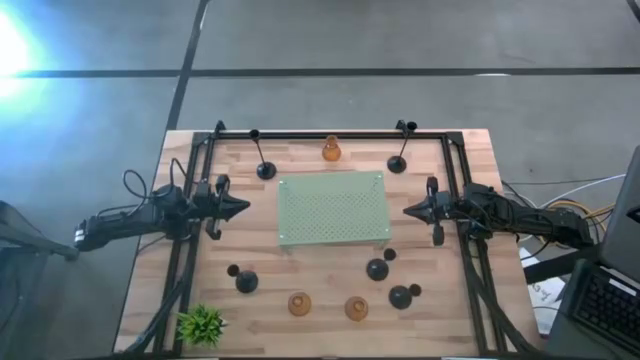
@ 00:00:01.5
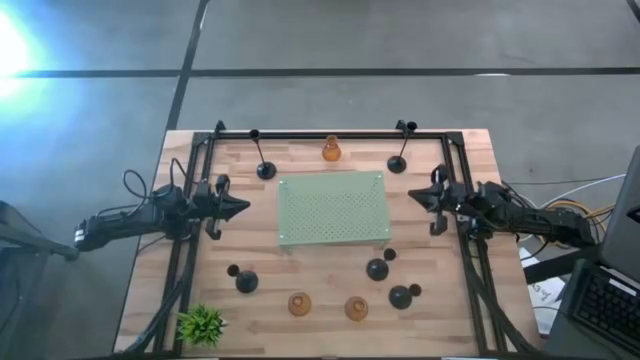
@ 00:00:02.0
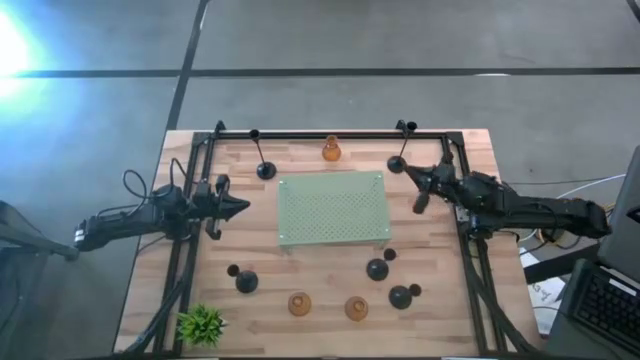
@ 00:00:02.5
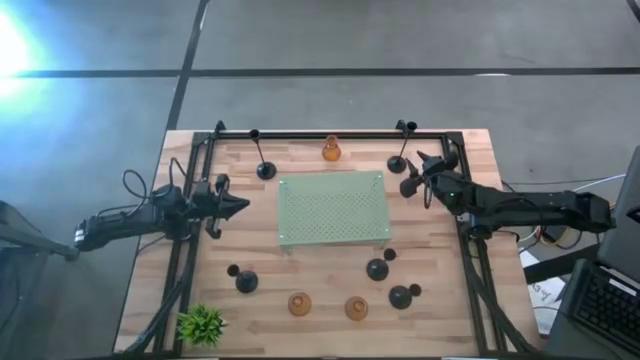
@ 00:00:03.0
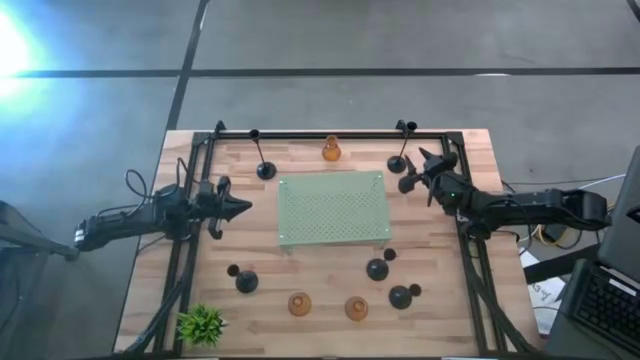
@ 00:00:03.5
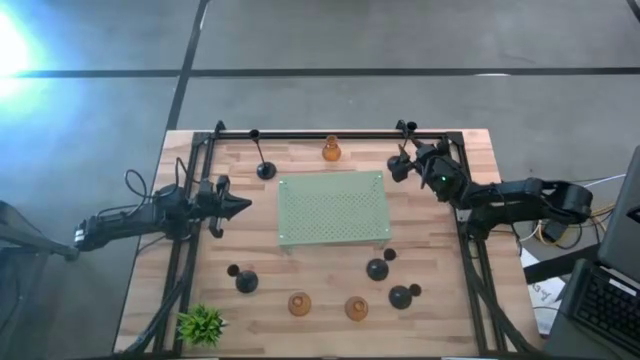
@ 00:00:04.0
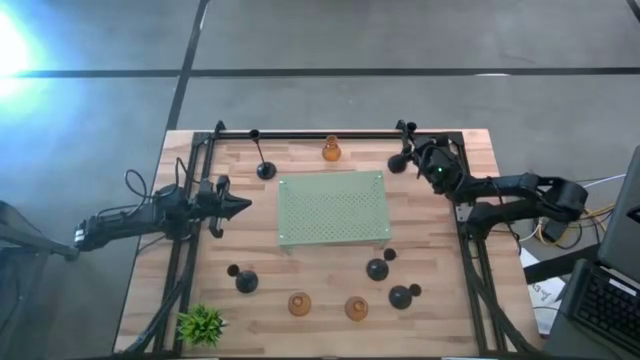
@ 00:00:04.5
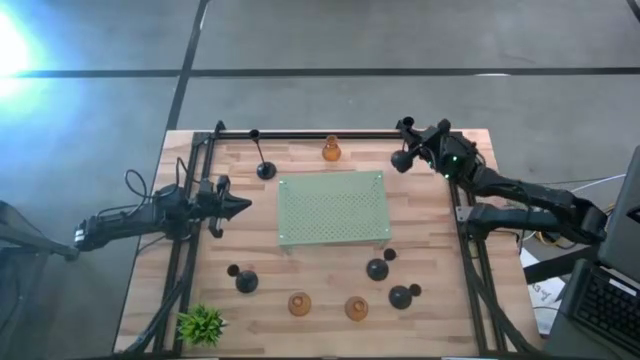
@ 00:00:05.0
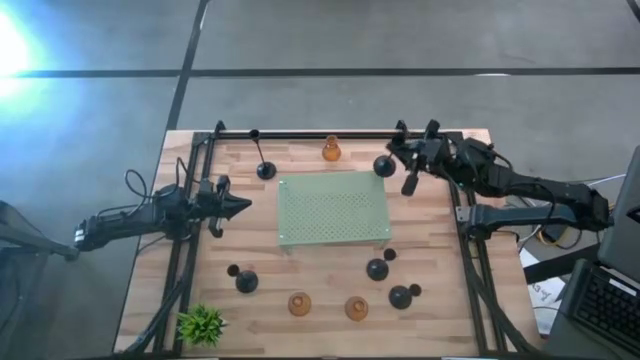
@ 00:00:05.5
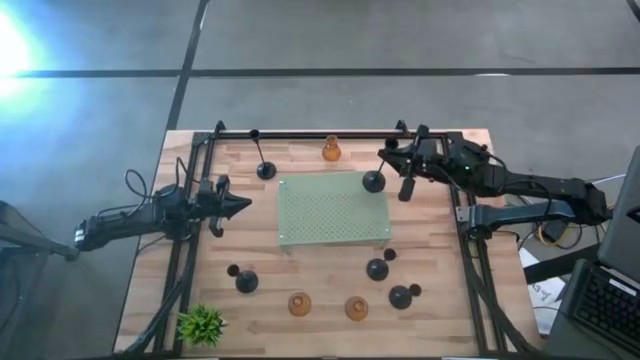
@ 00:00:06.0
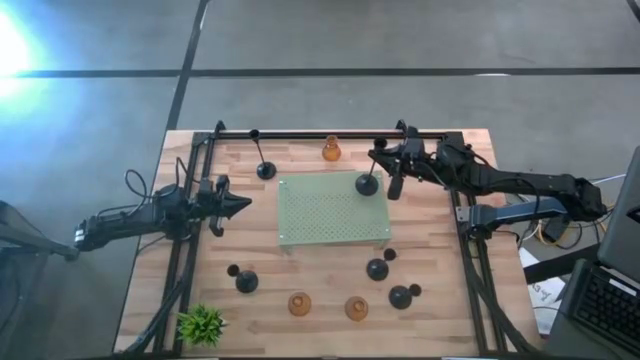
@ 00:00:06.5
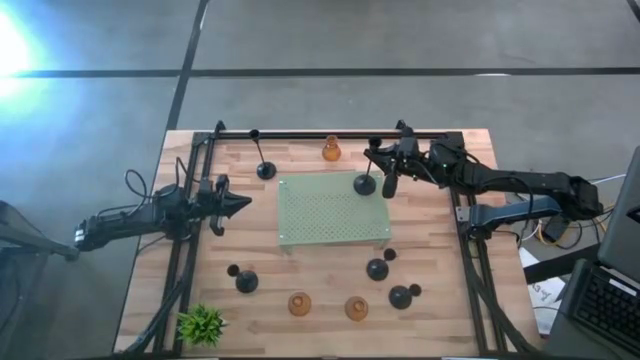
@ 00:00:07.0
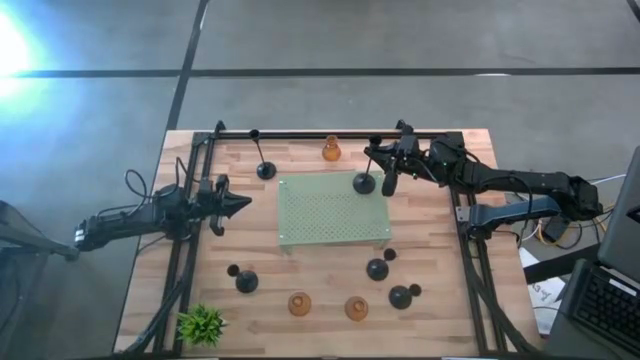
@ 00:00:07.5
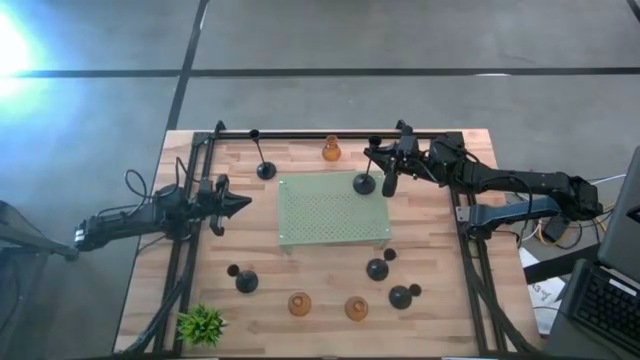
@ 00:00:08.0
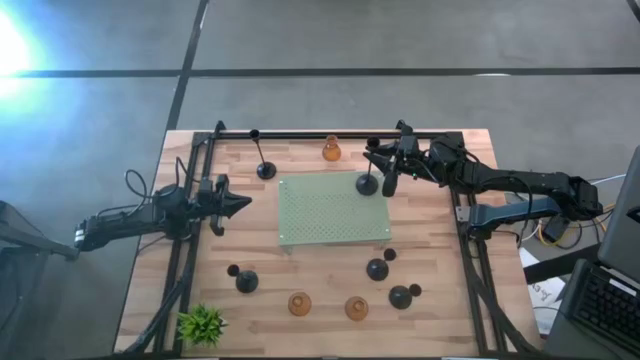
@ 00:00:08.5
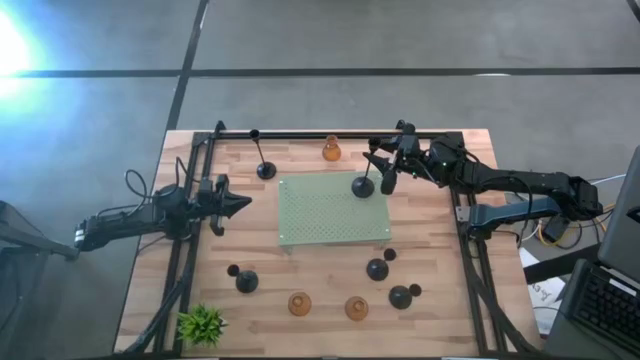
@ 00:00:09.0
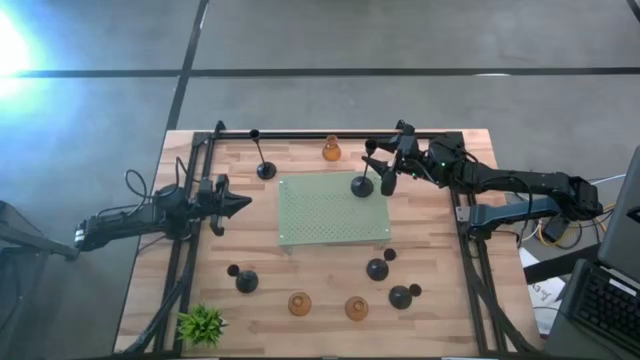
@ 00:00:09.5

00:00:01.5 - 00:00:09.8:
Task: Pick & Place candle stick holders
Put the top right large black candle holder on the shelf

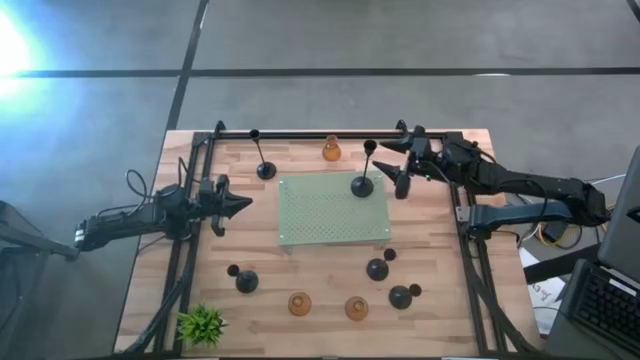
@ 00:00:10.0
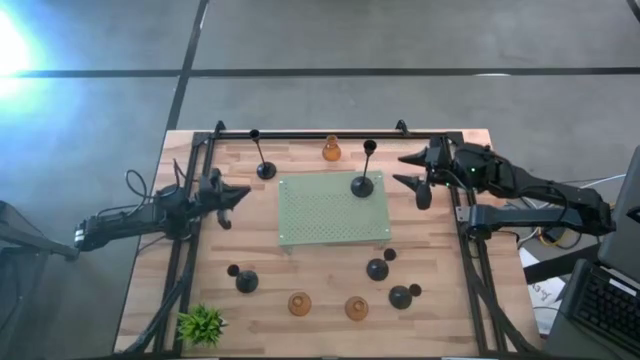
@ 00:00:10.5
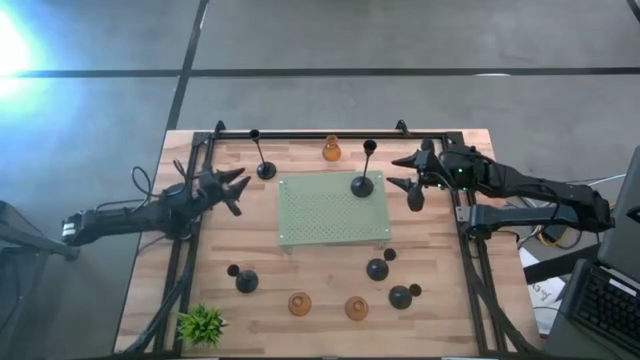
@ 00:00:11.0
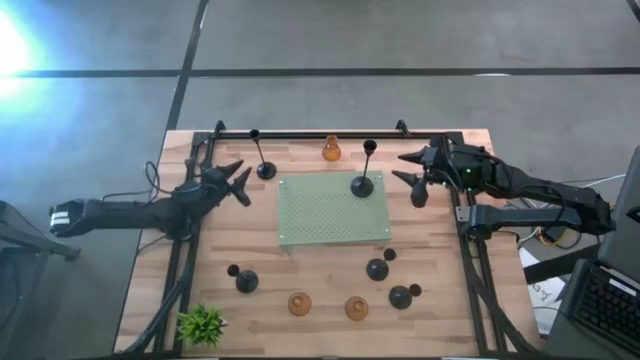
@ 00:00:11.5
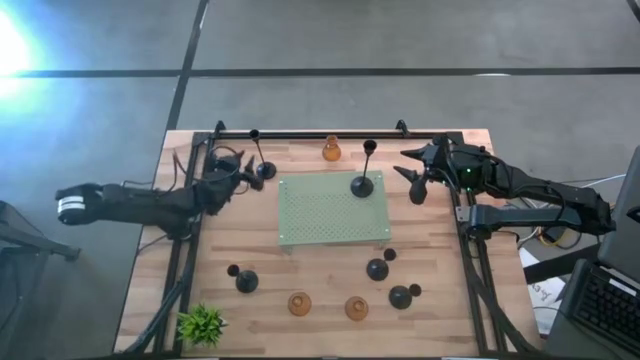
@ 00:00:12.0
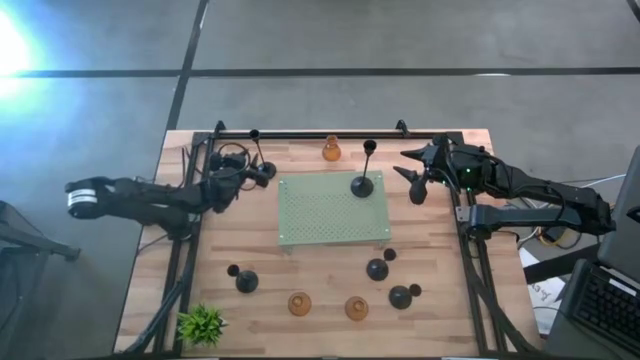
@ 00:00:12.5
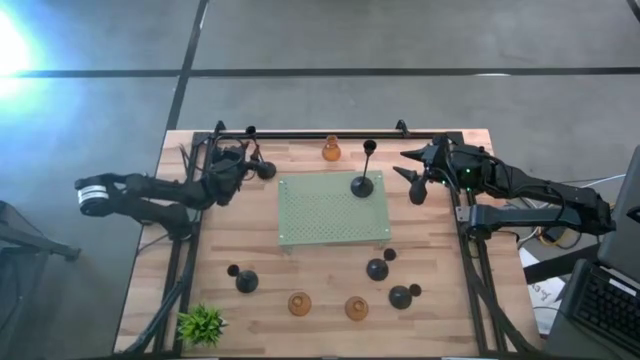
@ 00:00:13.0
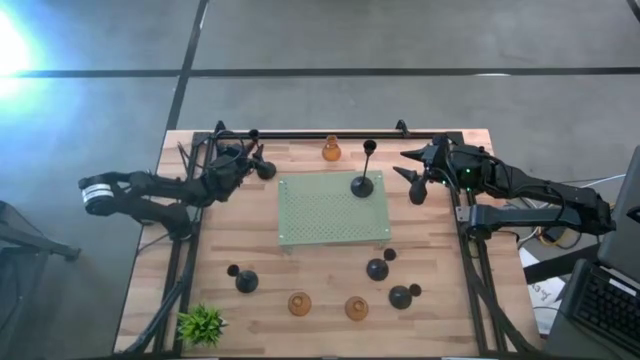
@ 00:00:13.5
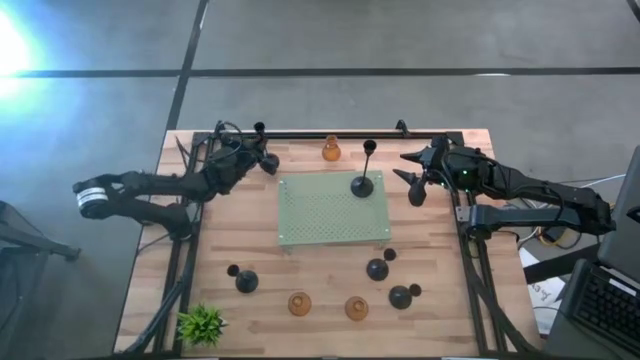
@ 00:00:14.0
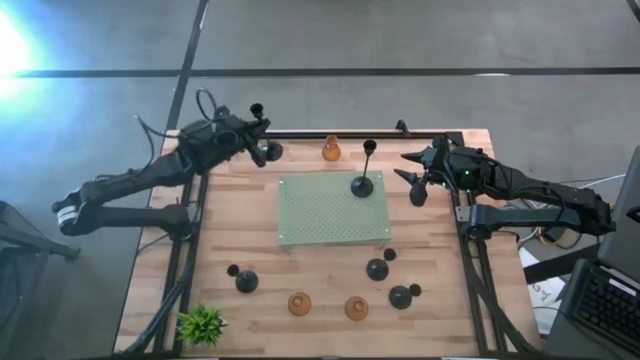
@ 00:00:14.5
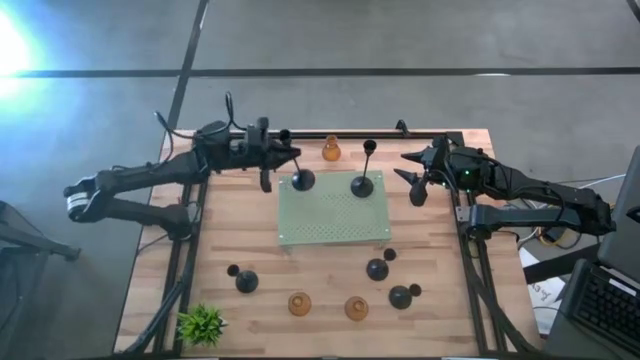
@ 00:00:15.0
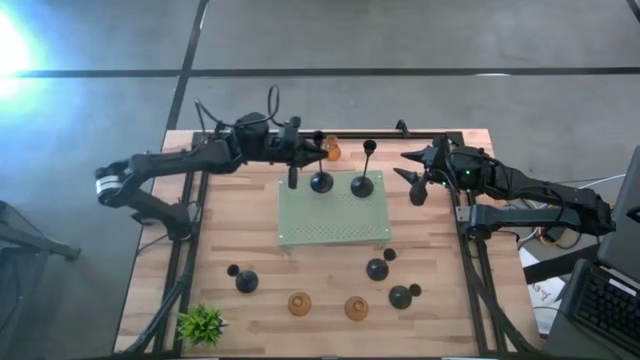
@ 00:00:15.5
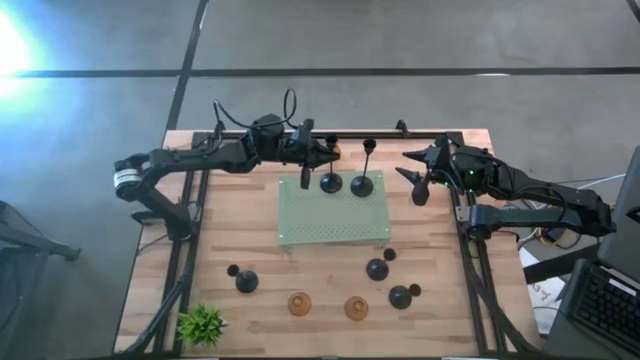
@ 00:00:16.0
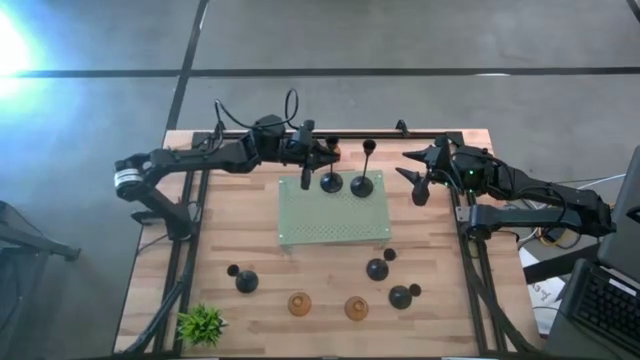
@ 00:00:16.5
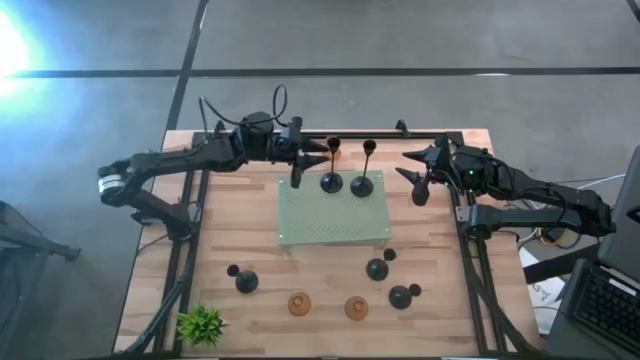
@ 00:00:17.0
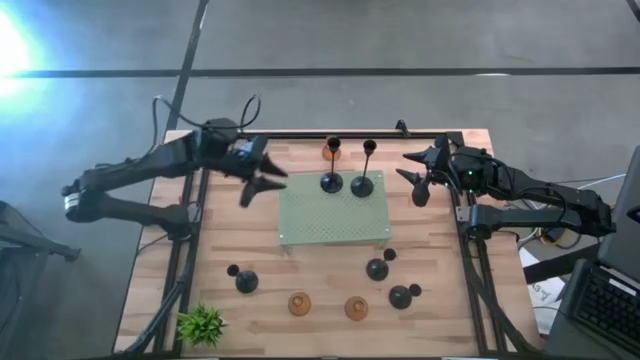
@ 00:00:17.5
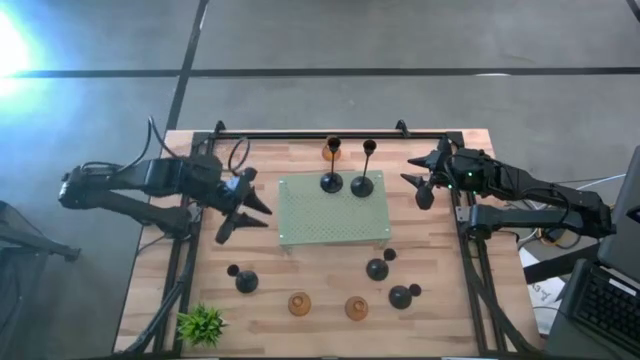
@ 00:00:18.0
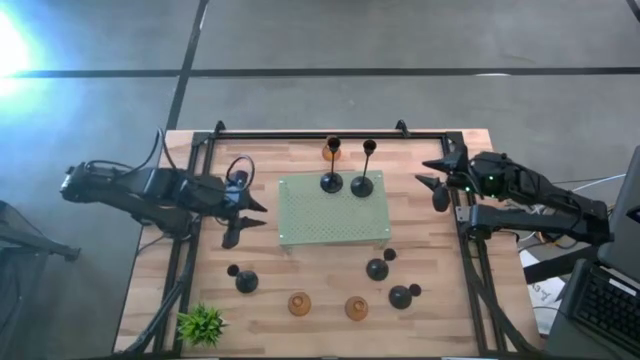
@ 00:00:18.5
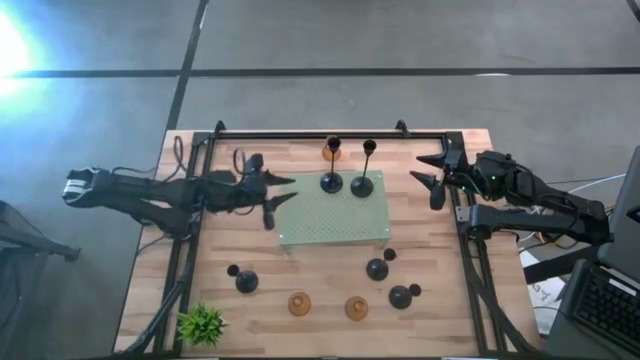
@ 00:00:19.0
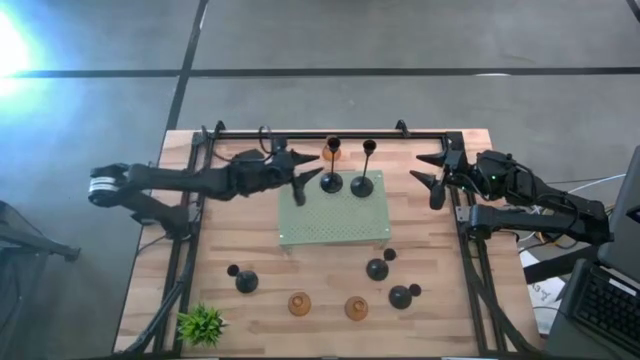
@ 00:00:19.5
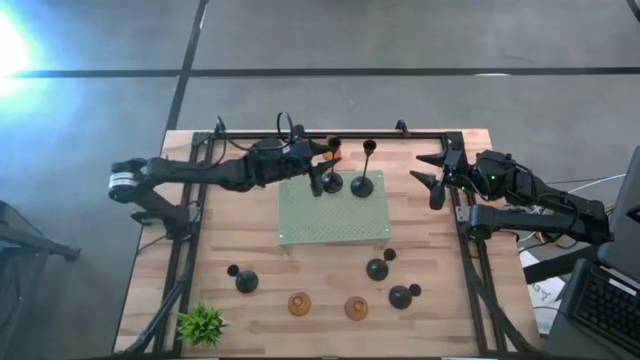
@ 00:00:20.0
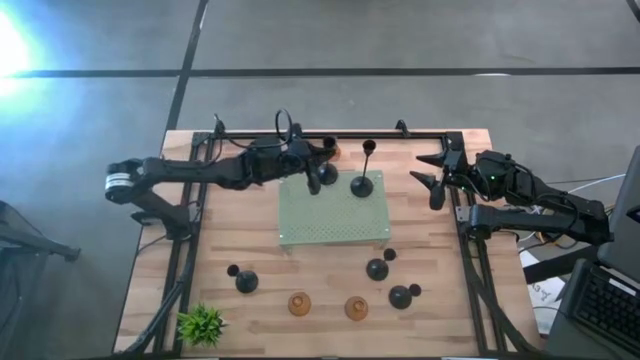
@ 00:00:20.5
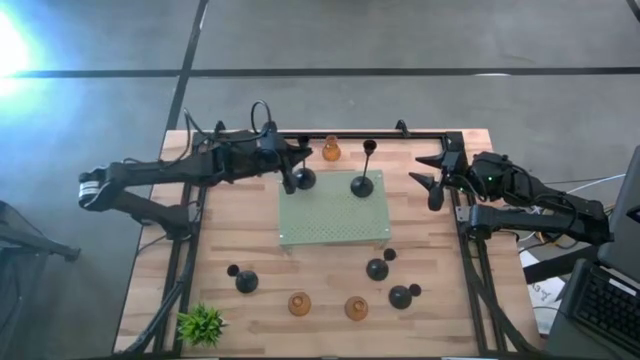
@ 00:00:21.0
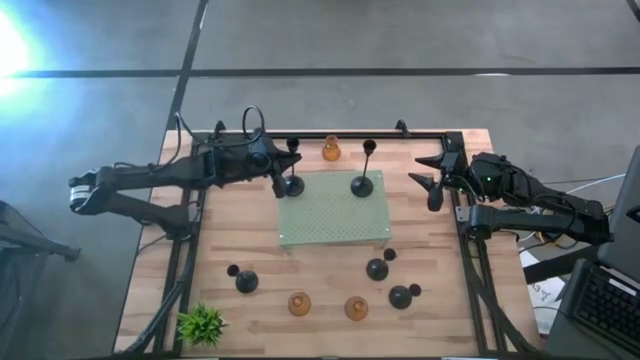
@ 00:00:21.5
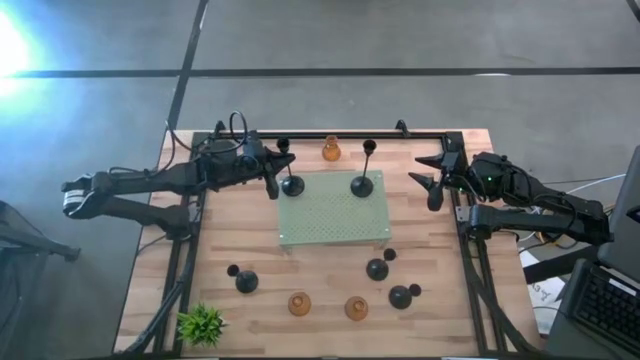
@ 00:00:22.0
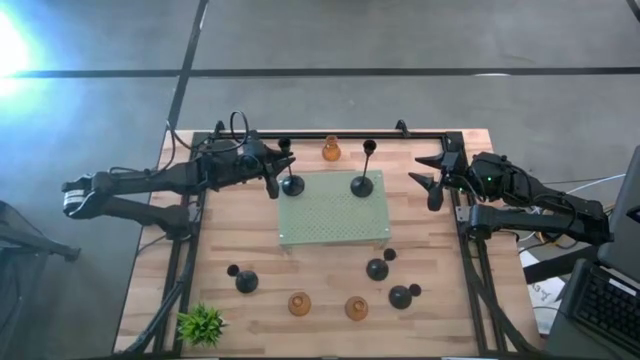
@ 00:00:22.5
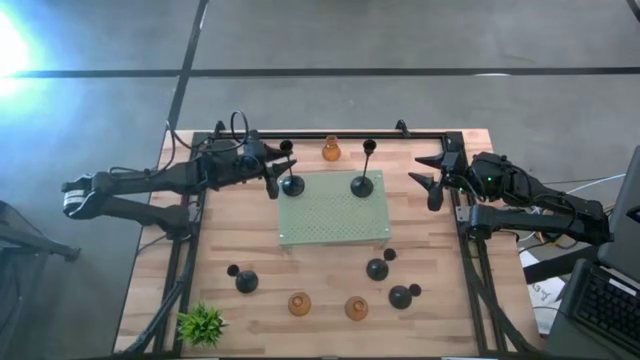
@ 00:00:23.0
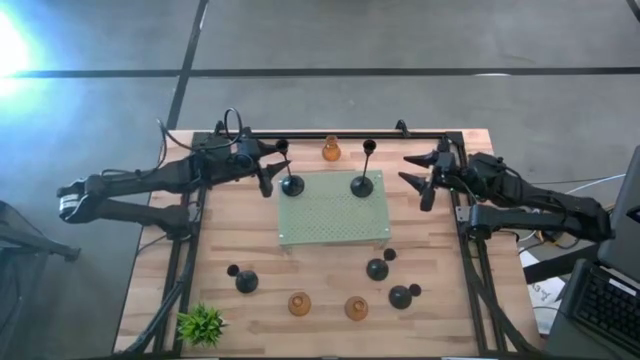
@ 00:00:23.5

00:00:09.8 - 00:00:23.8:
Put the top large black candle holder on the shelf
